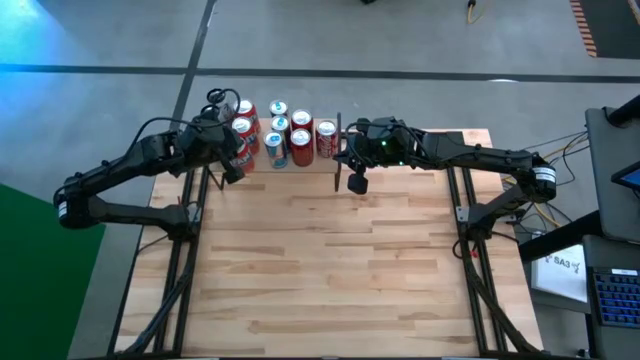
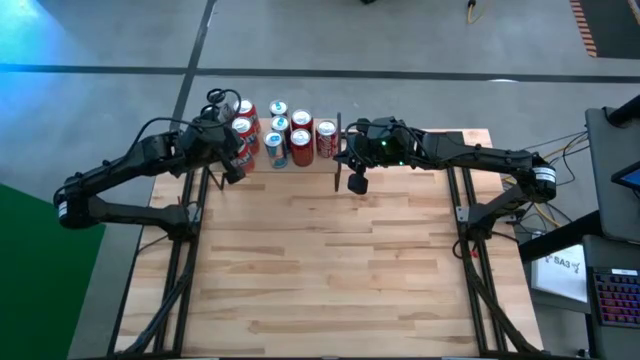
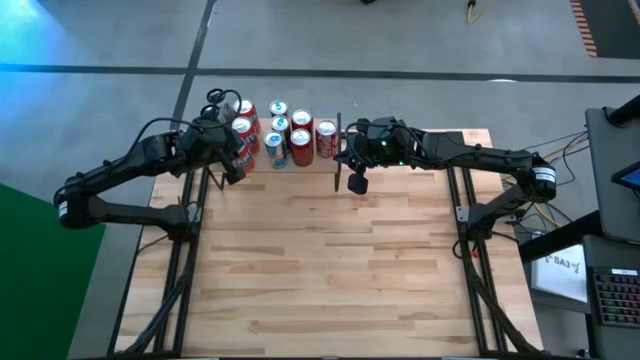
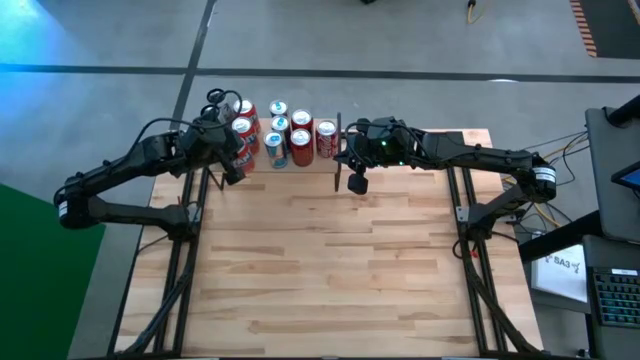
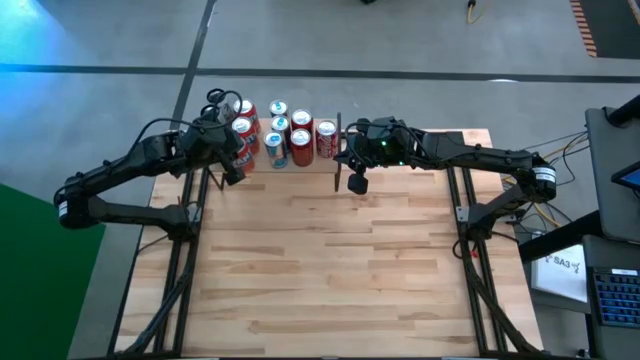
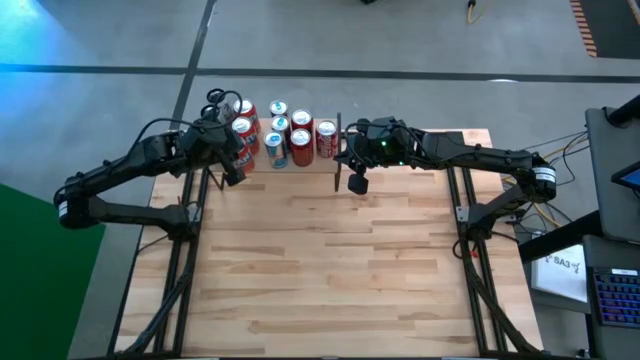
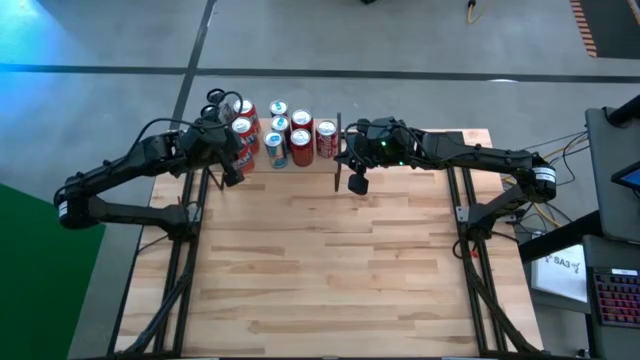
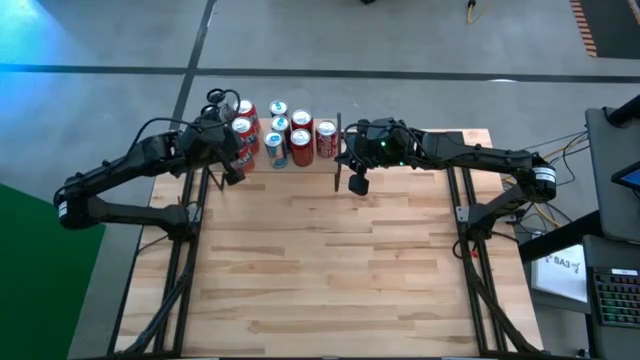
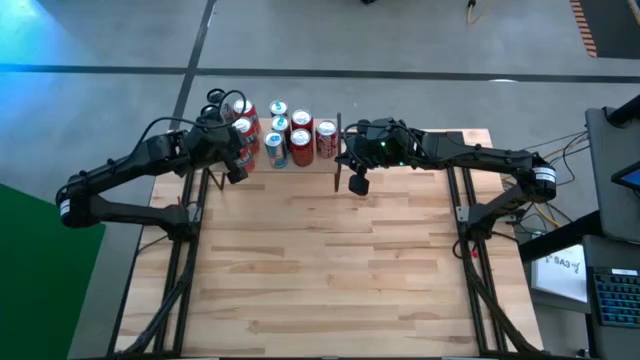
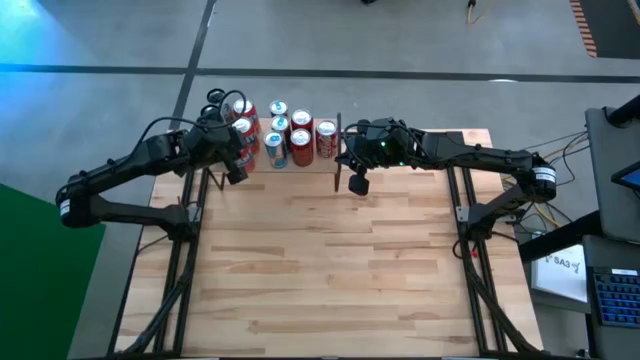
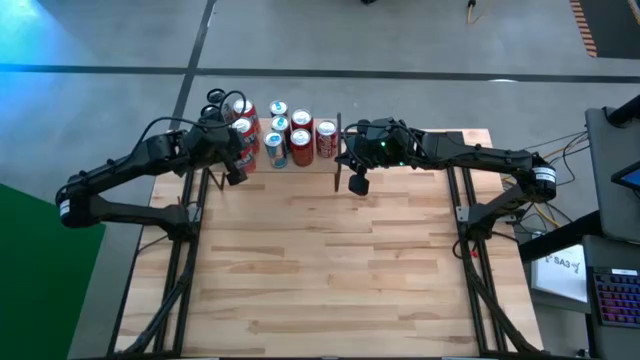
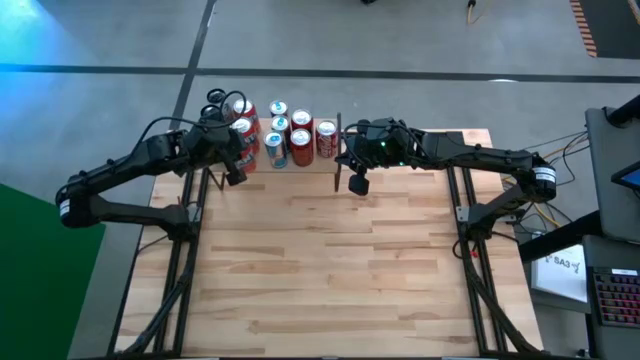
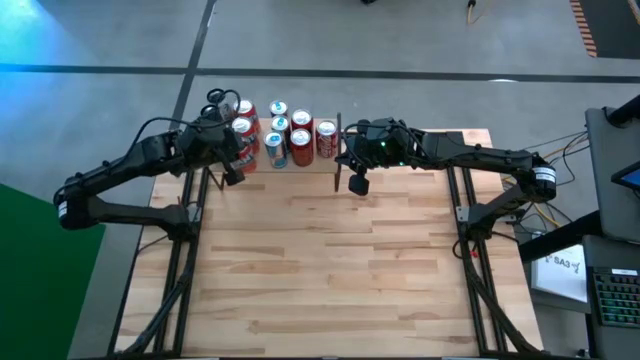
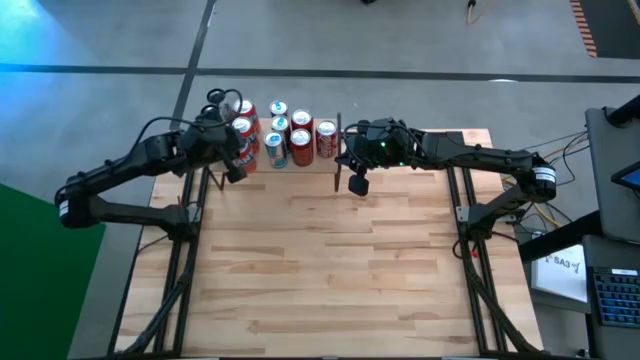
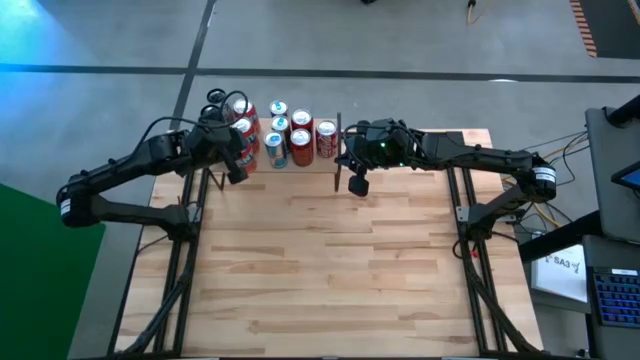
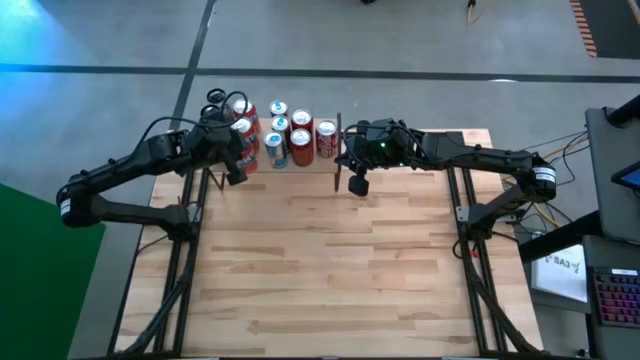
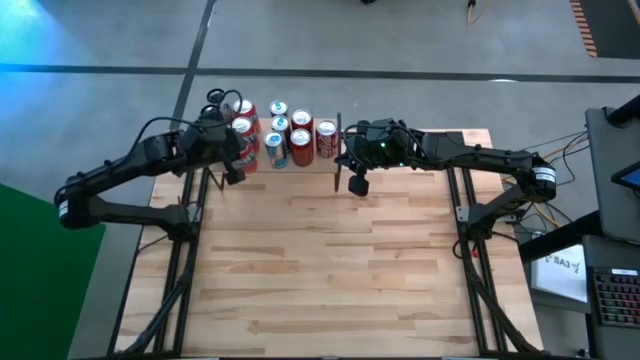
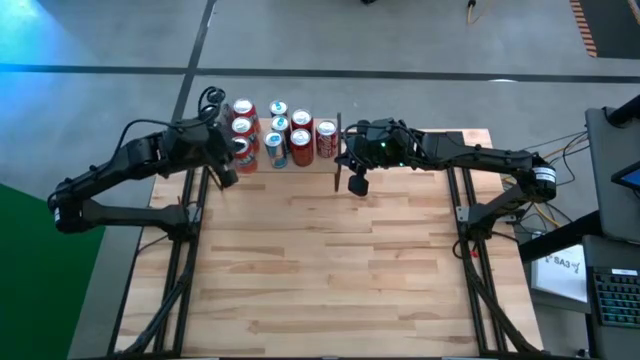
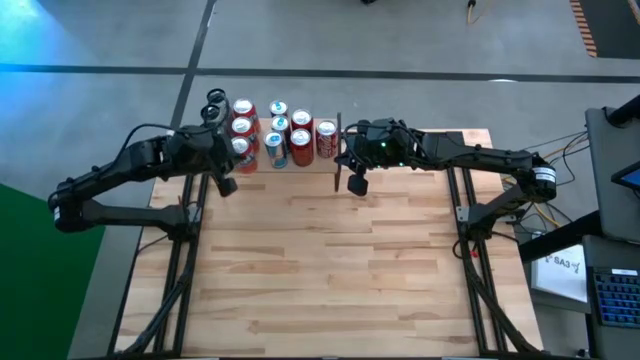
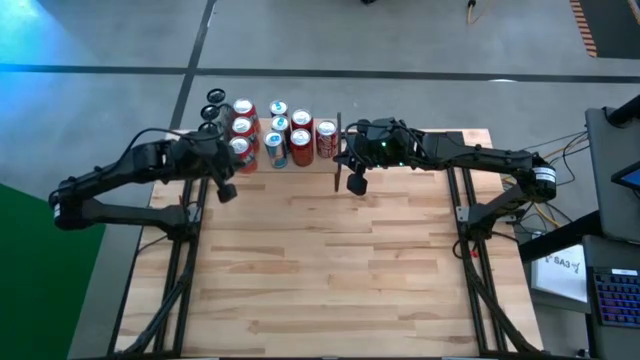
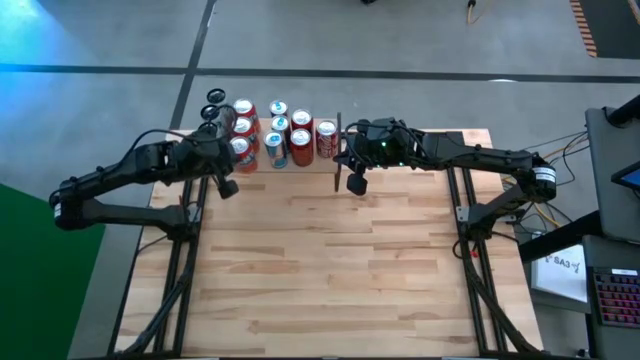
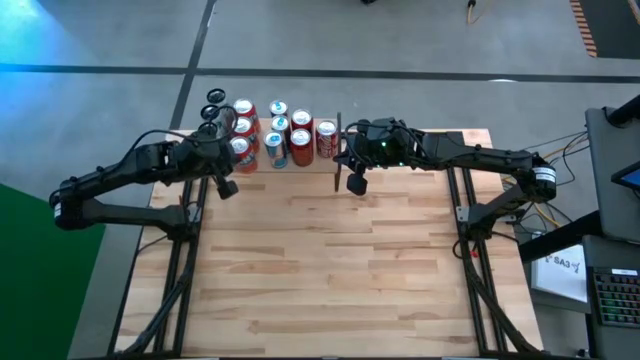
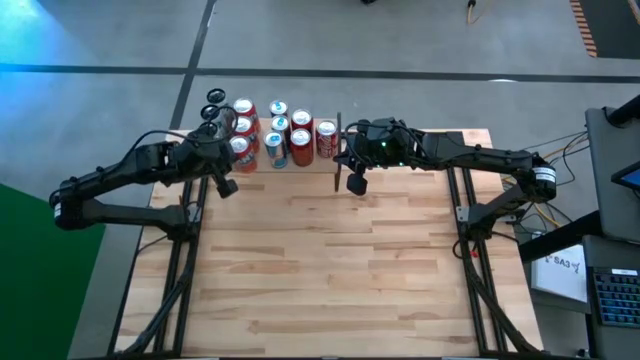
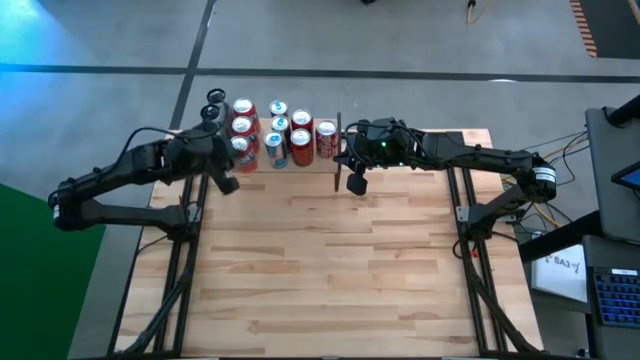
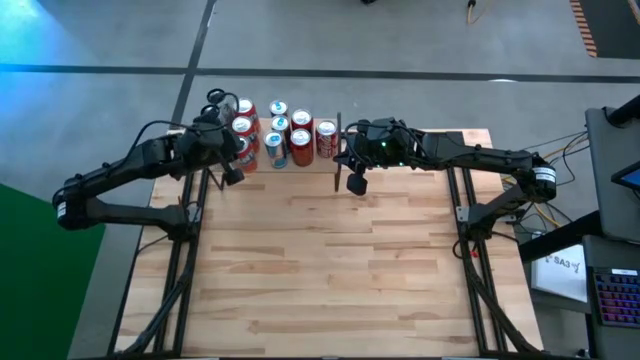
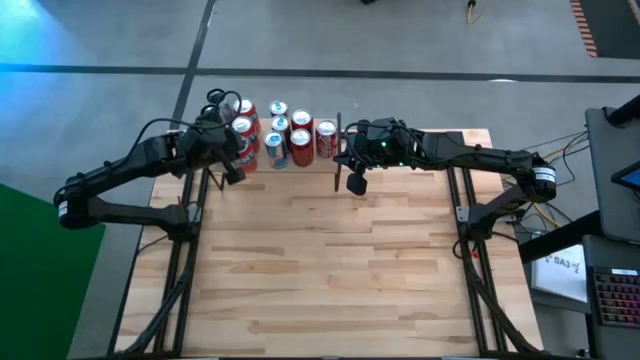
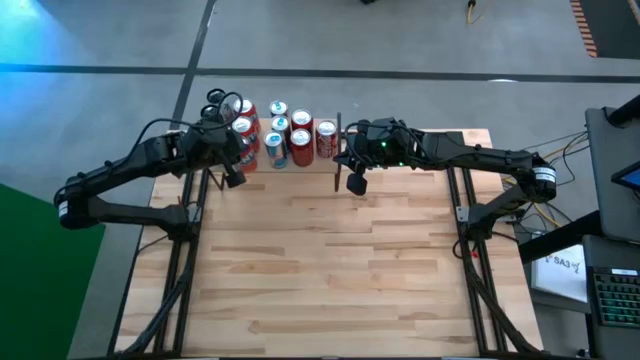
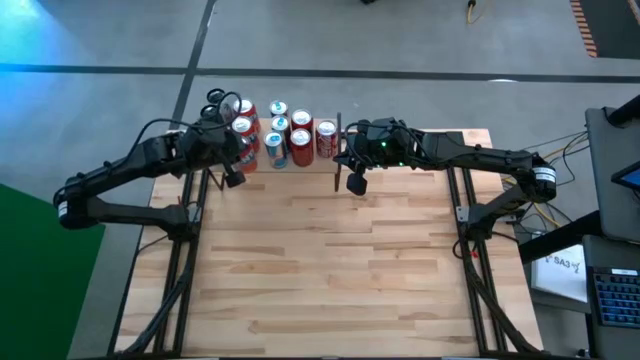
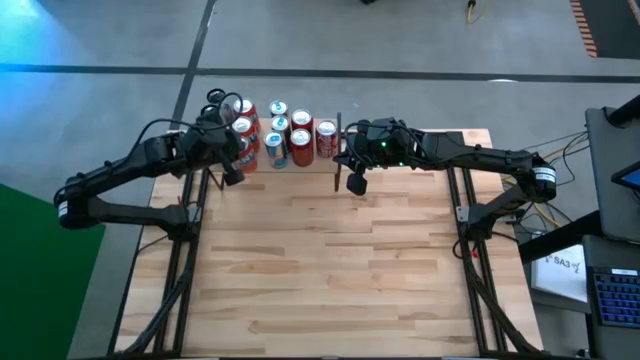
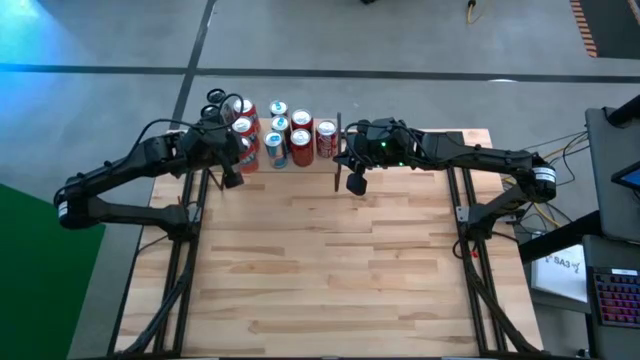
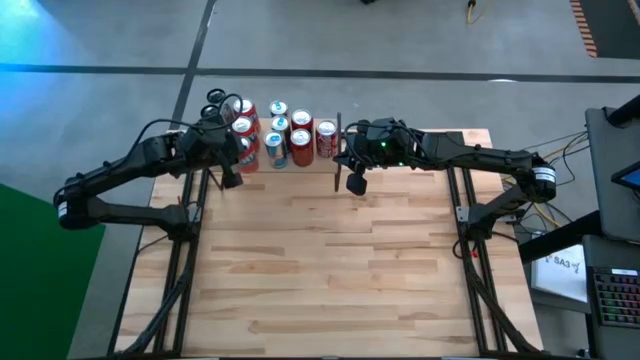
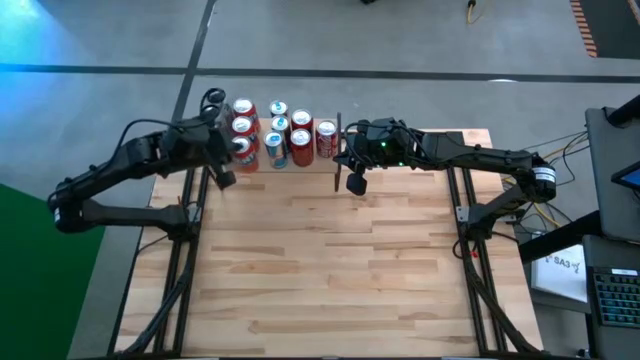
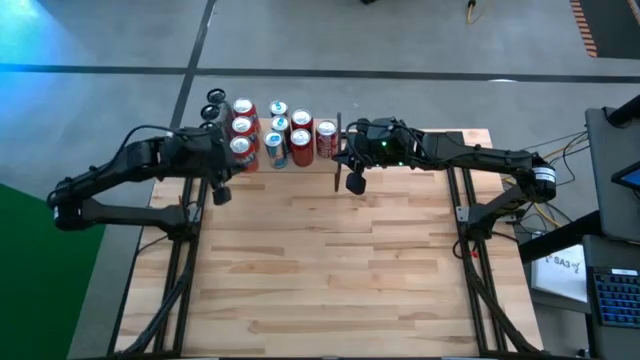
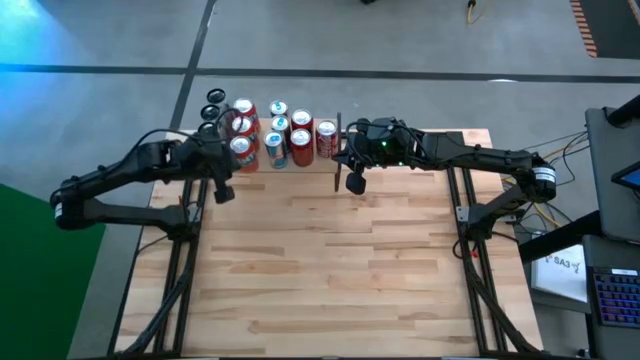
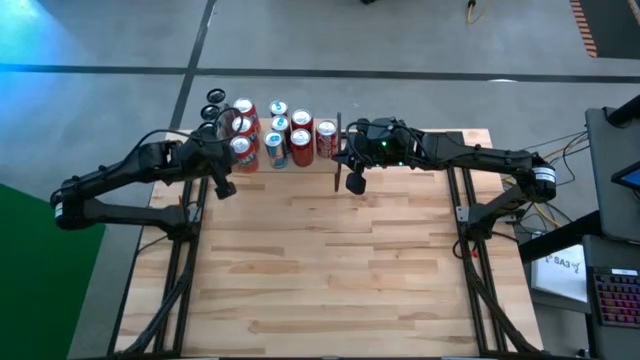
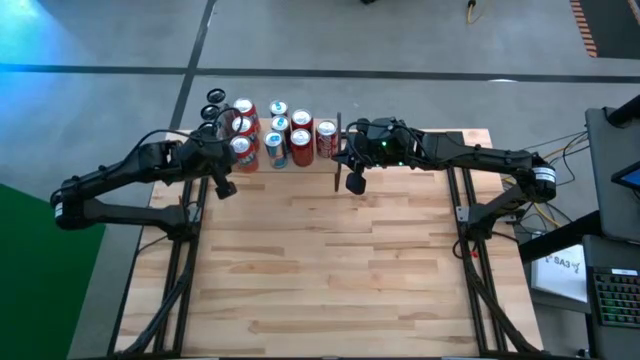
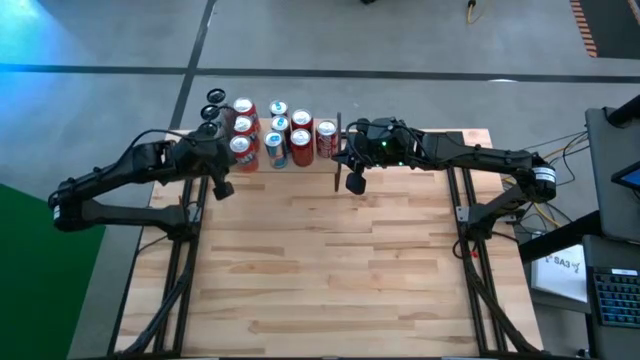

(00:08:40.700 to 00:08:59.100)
Task: Place canned beverage on shelf
Adjust the red soda can on the shelf

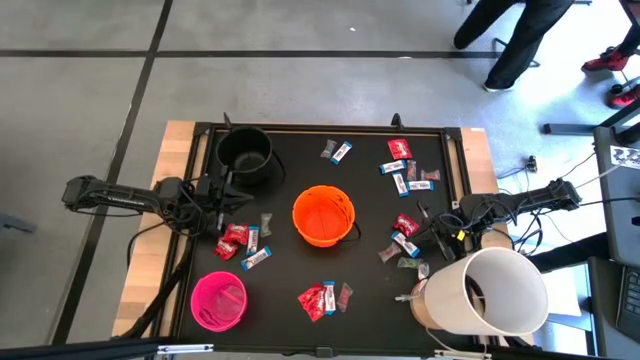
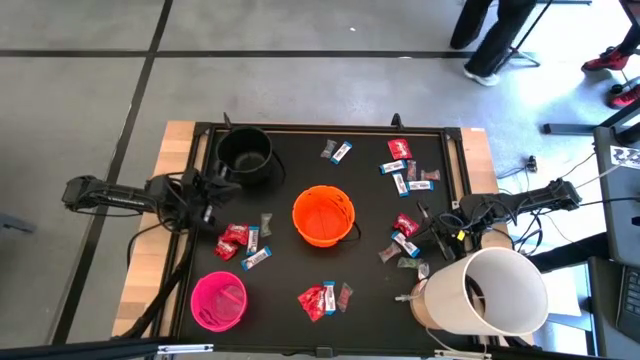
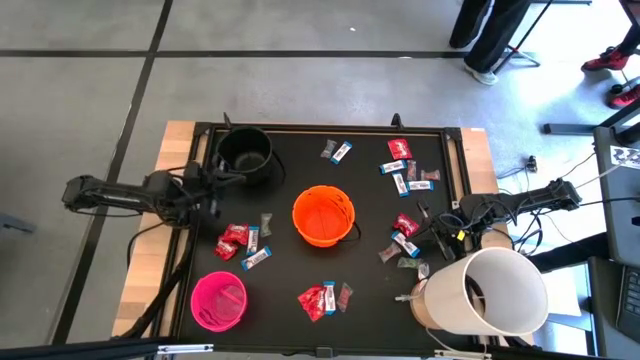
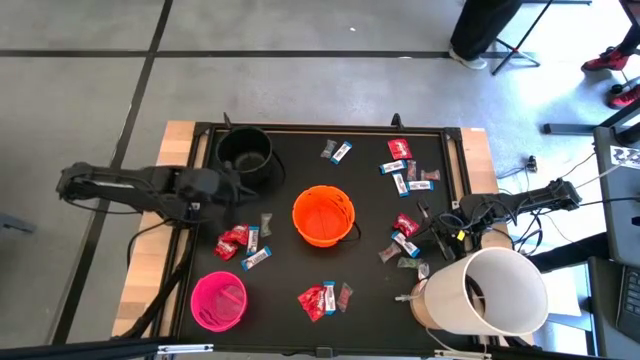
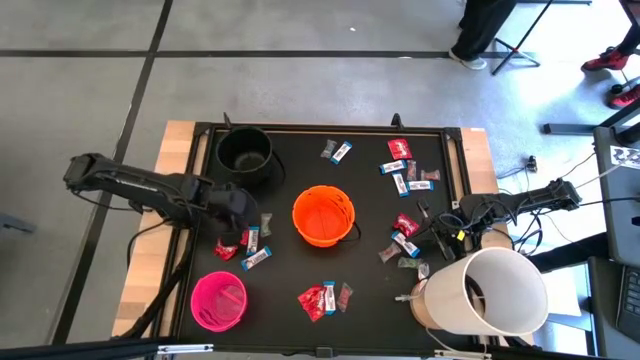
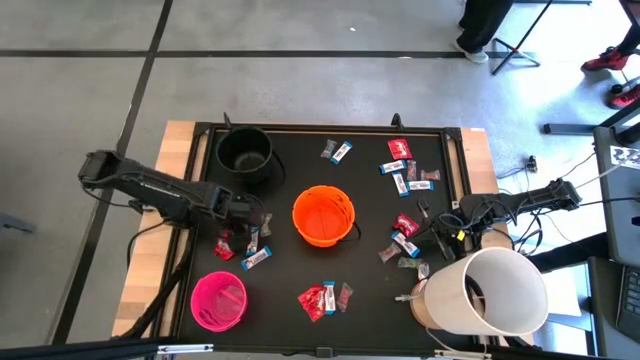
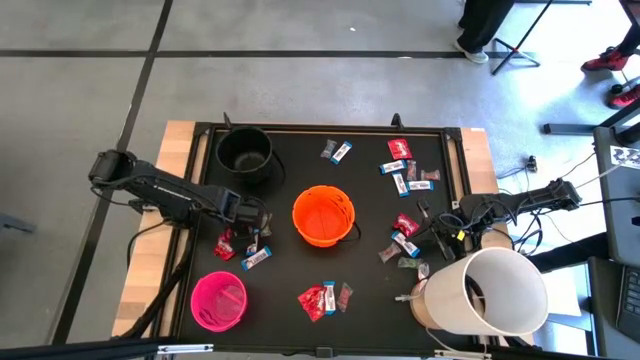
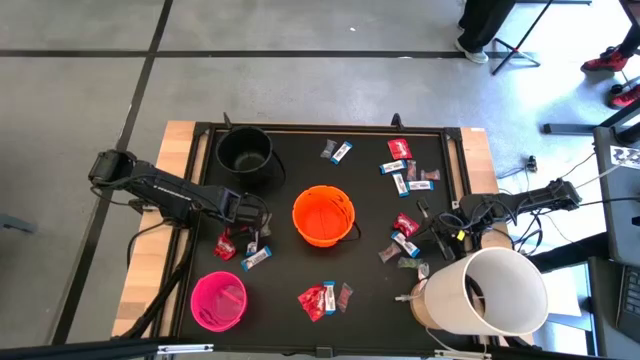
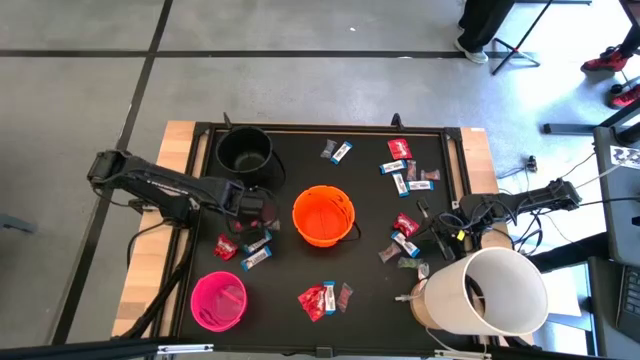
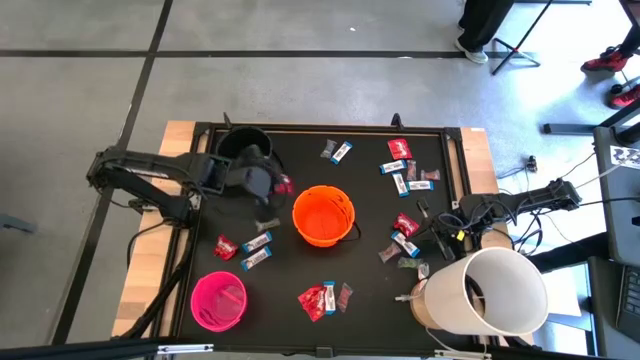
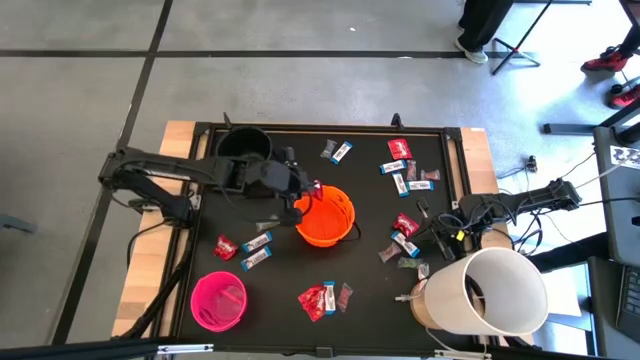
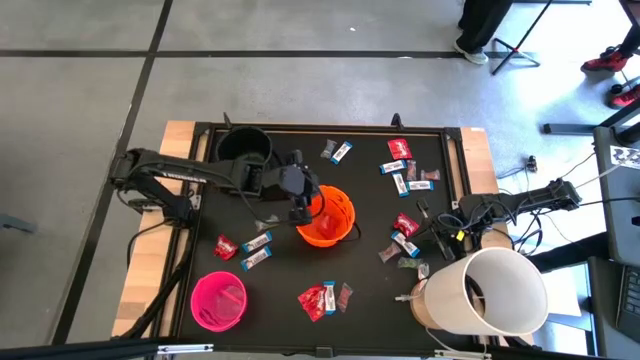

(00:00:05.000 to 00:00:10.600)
Task: Sort candy
Put the red candy into the orange bucket
